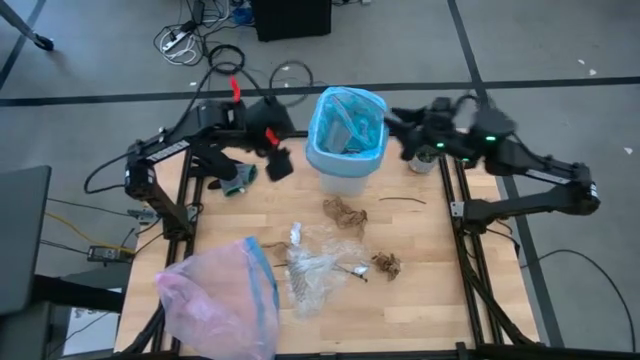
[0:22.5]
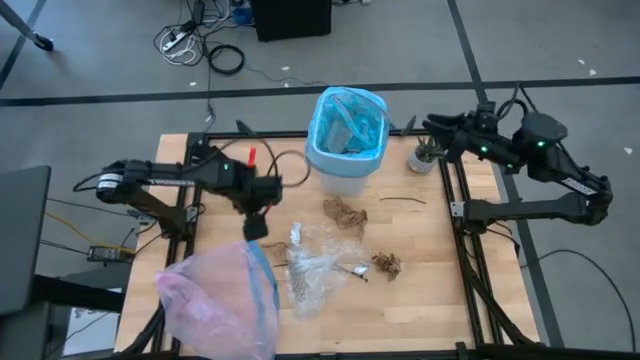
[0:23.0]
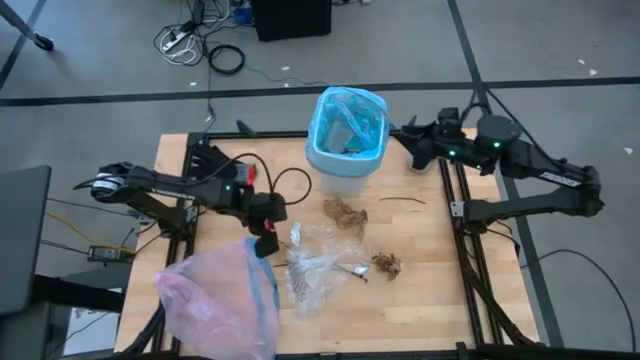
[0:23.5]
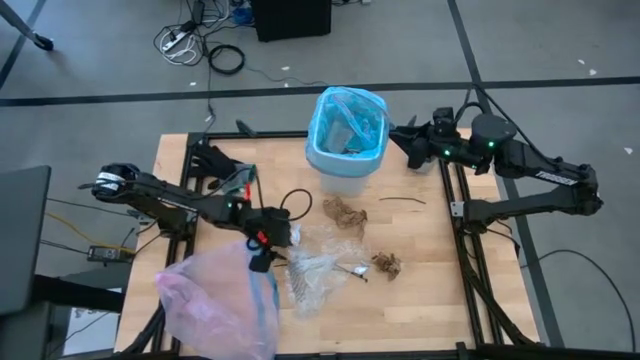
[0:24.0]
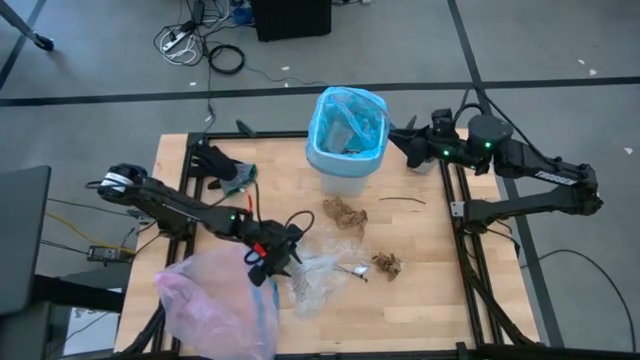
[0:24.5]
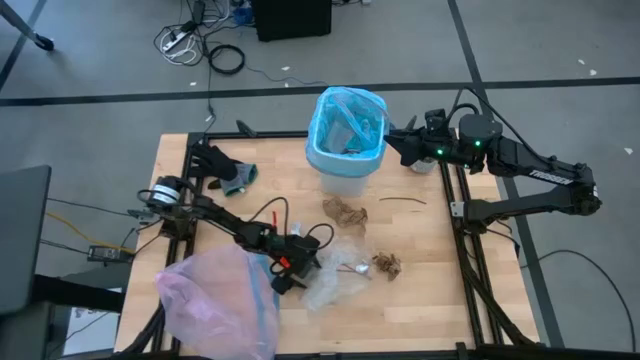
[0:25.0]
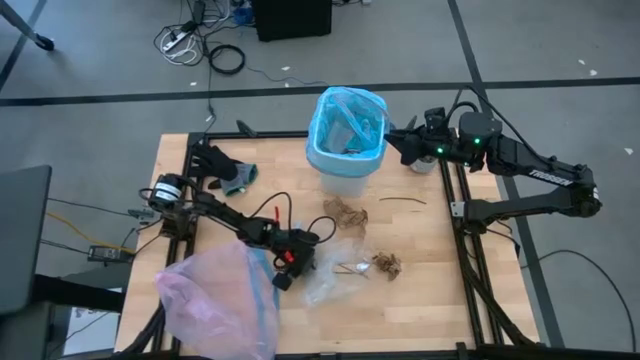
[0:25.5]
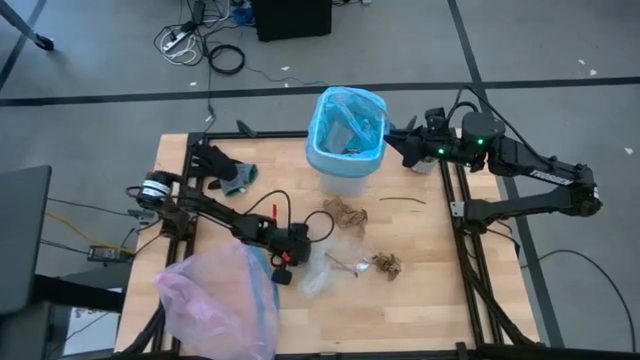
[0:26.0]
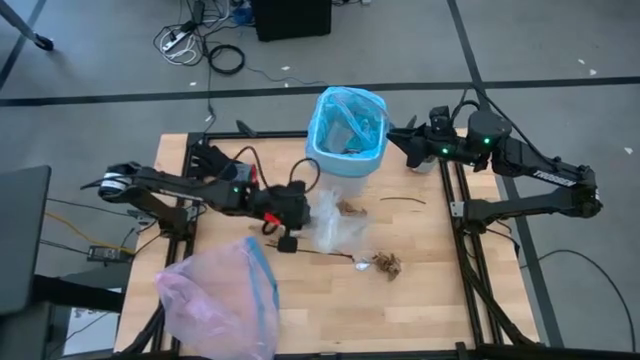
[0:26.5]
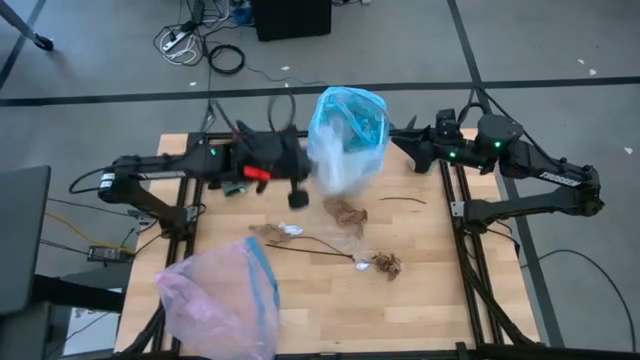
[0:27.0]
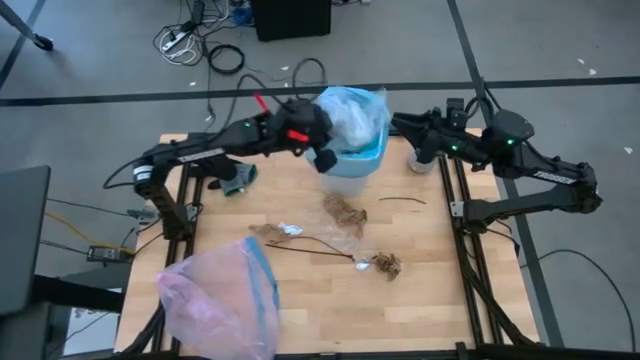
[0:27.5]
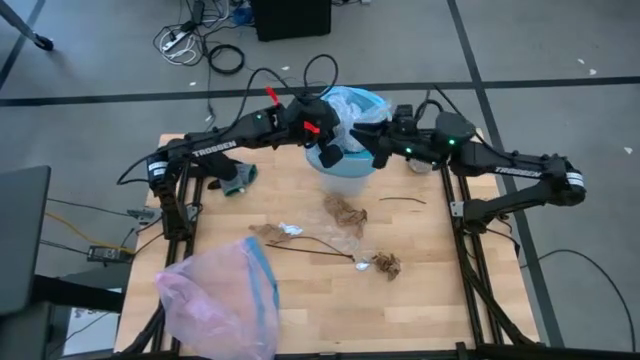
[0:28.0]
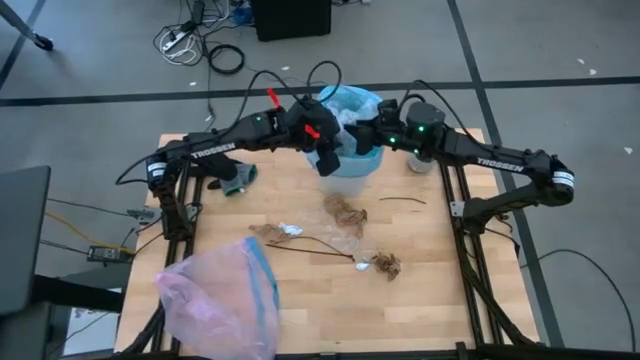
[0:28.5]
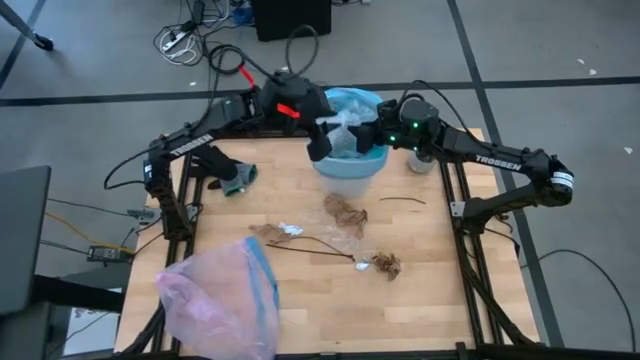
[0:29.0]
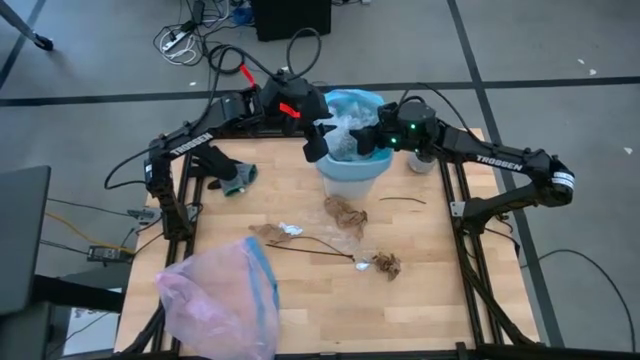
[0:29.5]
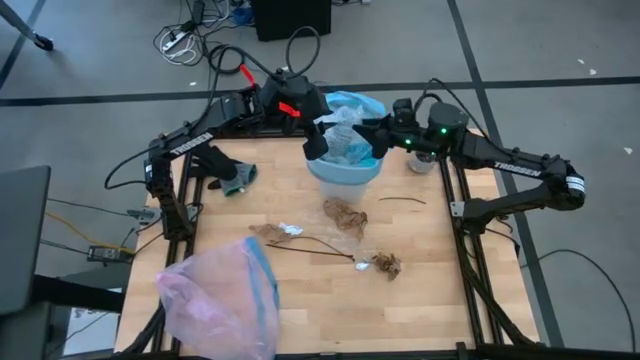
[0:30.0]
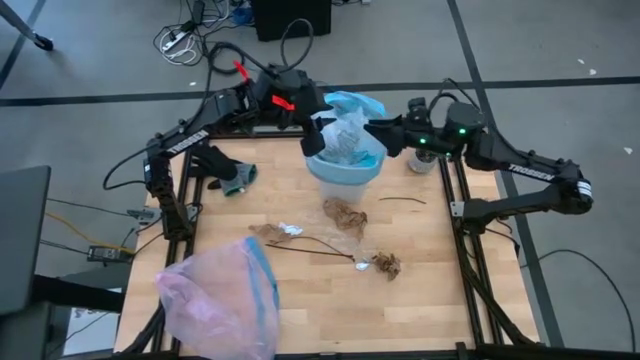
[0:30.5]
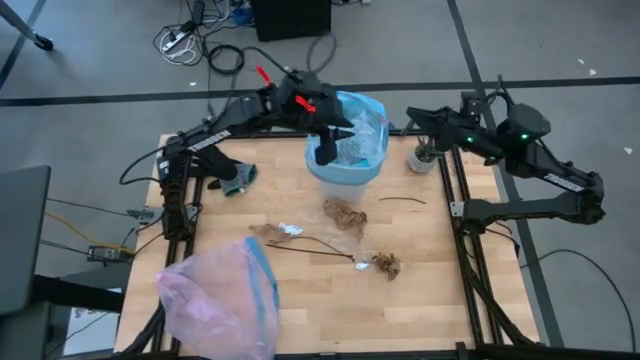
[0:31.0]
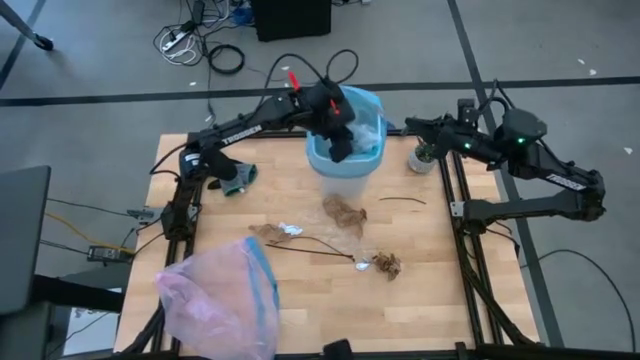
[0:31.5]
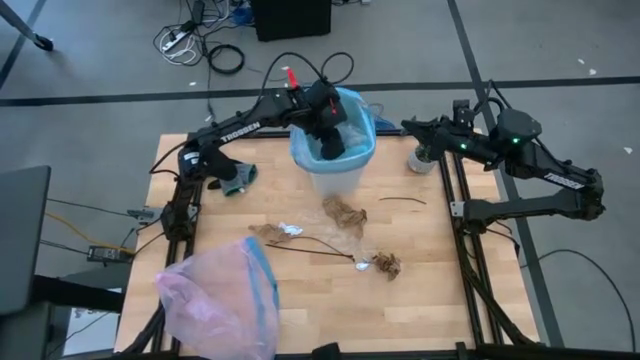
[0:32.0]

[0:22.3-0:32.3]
Task: place trash/remove bag and relplace
Put the transparent plastic trash from the table into the trash bin

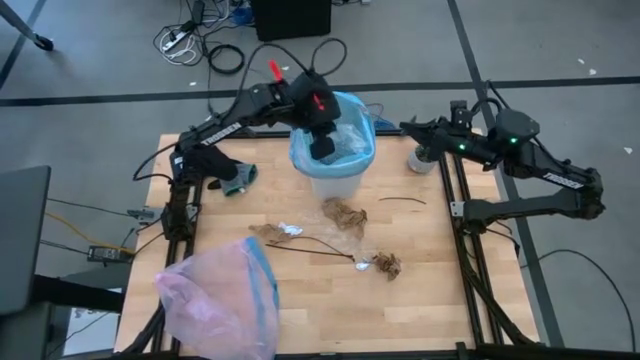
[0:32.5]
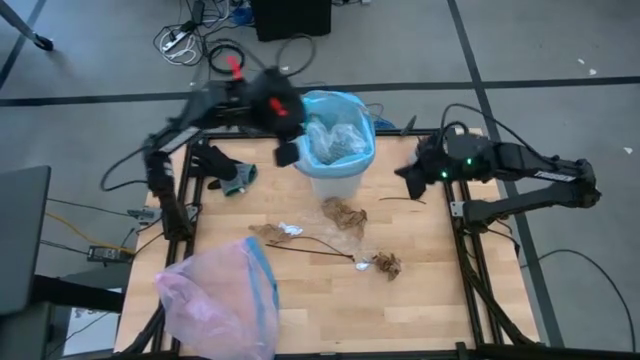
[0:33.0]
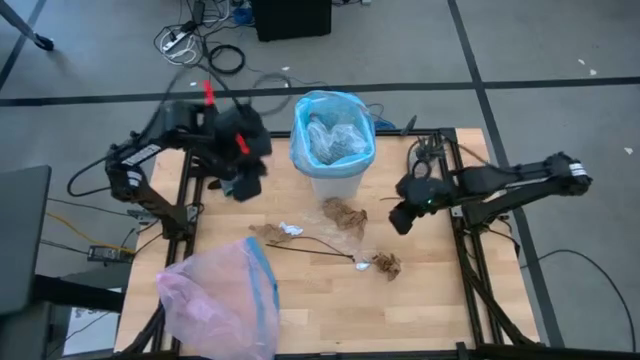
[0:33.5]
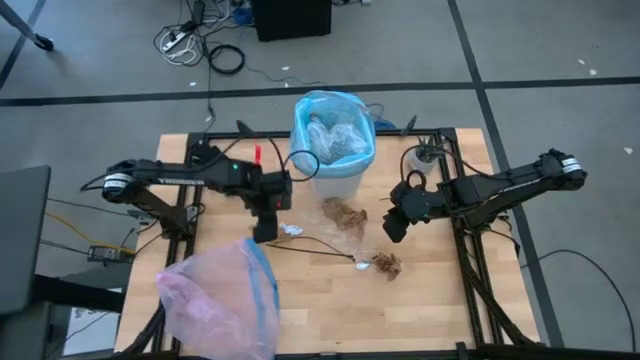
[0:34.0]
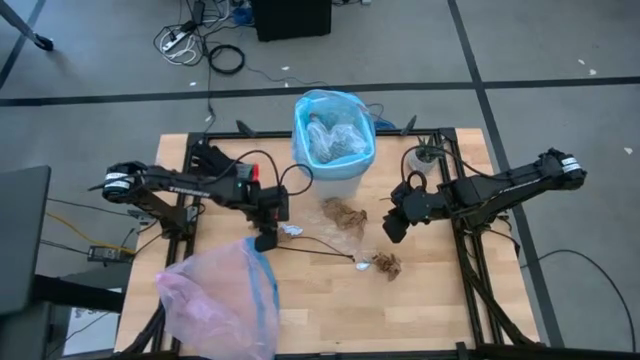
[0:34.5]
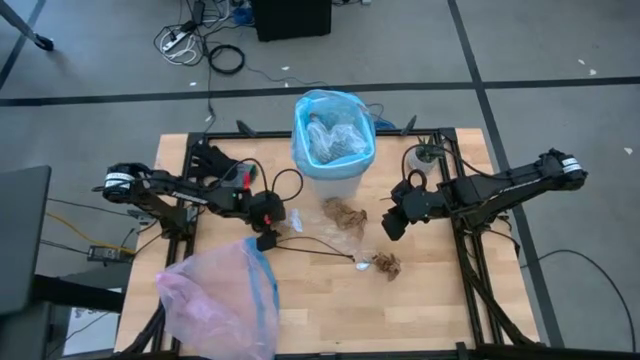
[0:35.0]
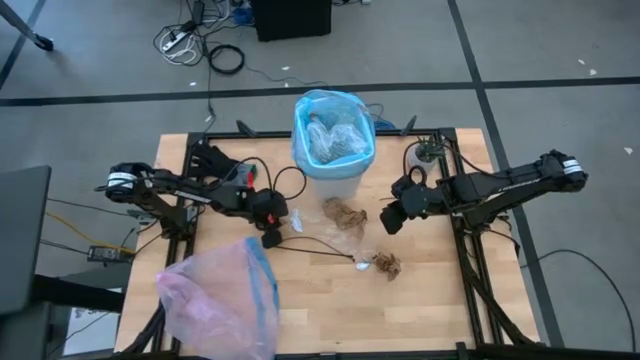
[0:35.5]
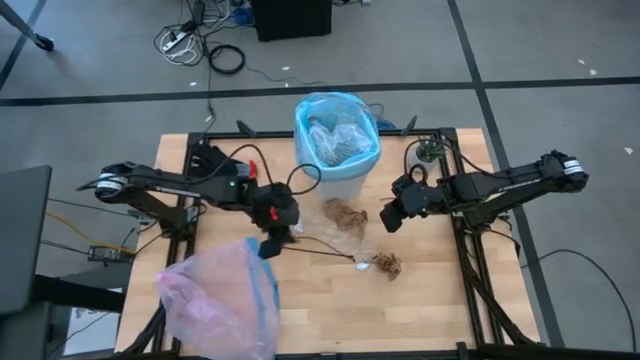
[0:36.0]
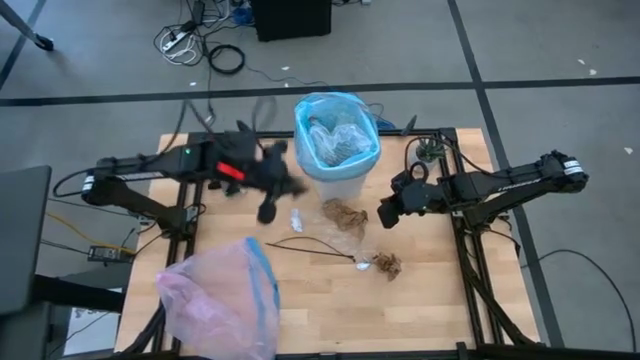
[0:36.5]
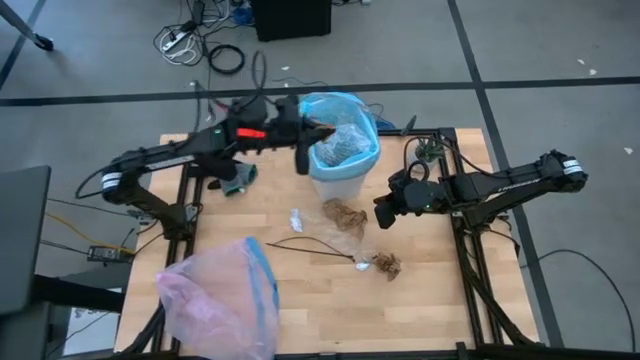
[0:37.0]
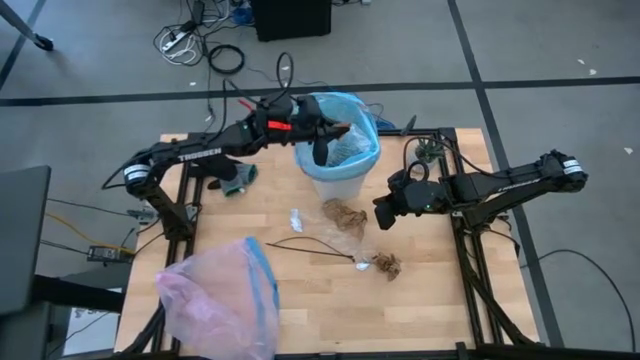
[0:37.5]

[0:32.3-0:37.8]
Put the brown paper into the trash bin

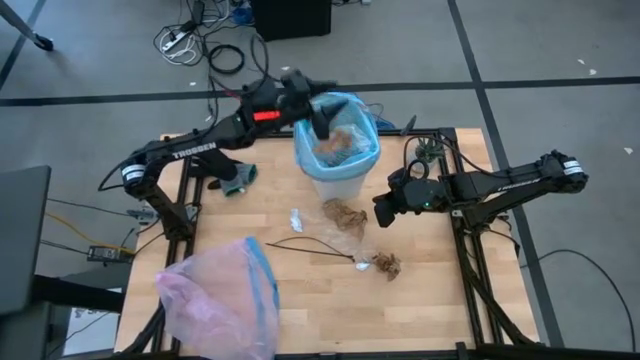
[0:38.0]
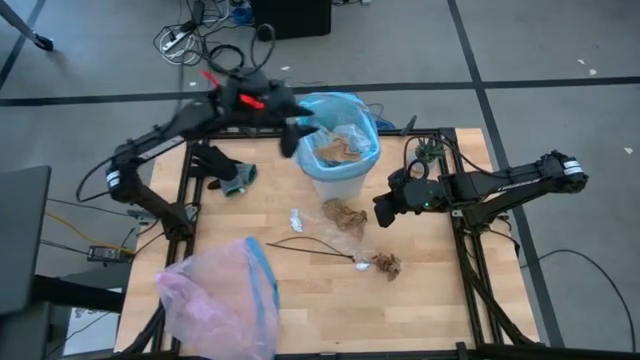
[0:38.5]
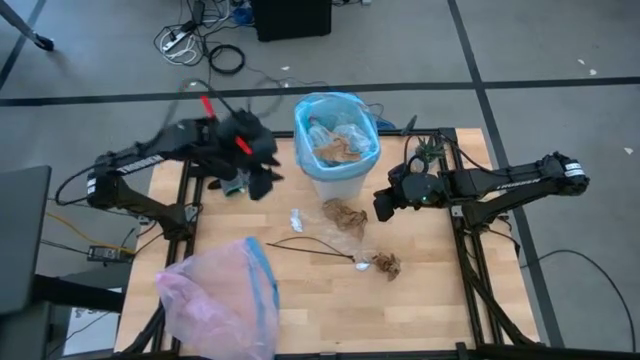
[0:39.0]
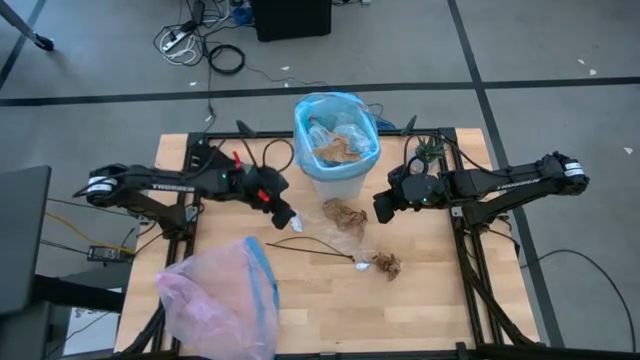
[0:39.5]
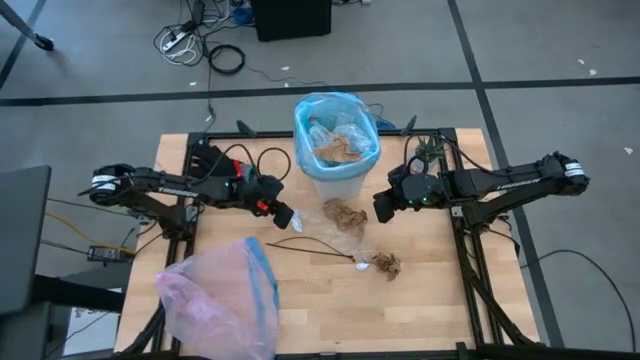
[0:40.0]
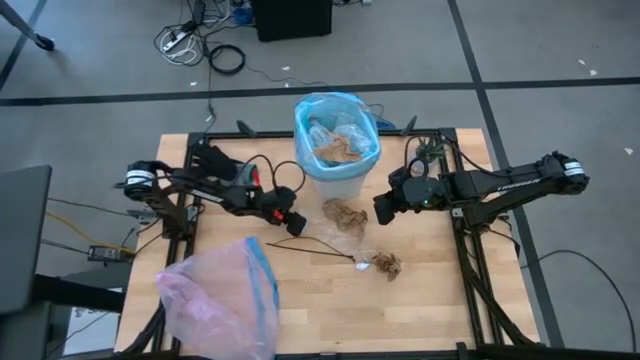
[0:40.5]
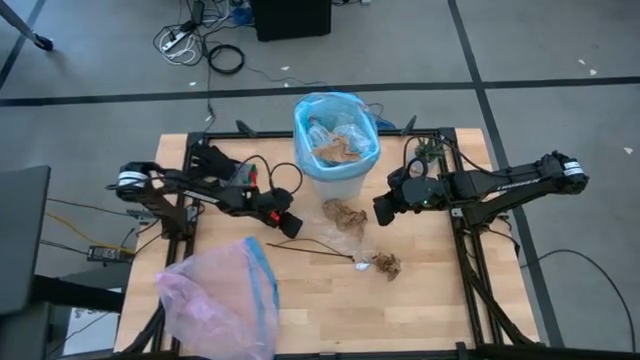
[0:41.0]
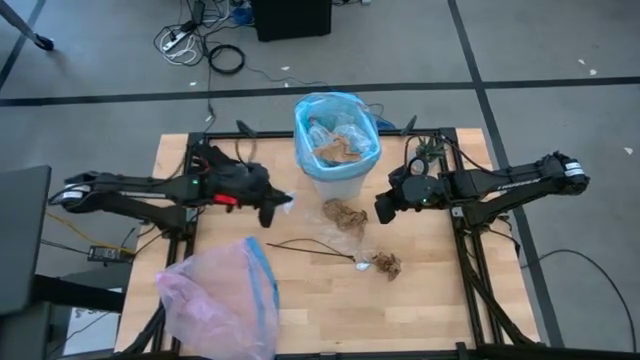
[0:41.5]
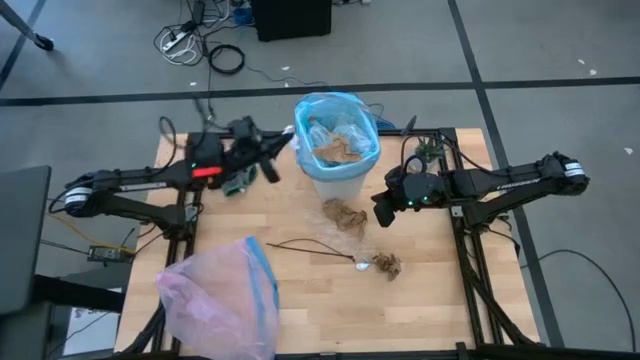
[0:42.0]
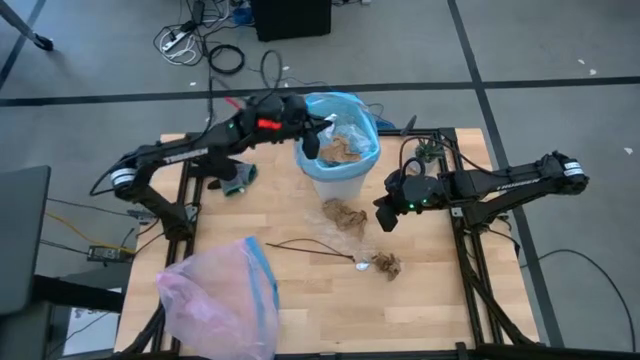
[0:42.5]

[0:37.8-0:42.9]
Put the white paper into the trash bin

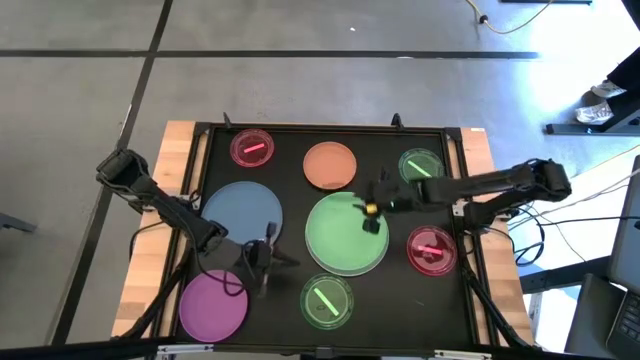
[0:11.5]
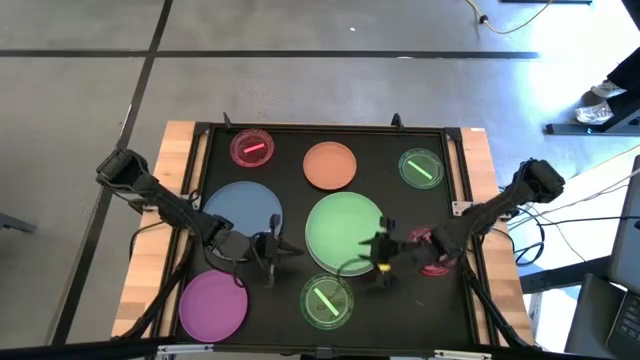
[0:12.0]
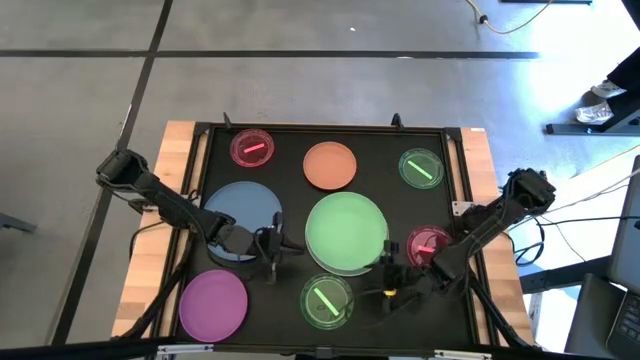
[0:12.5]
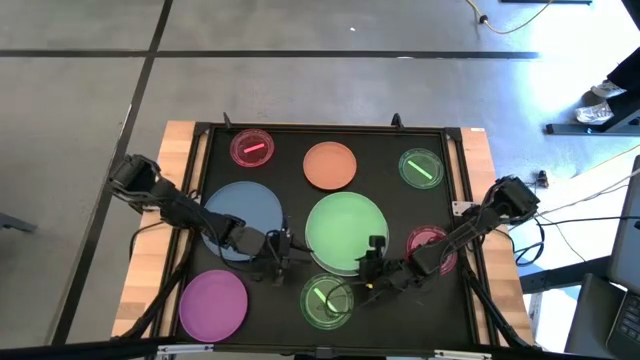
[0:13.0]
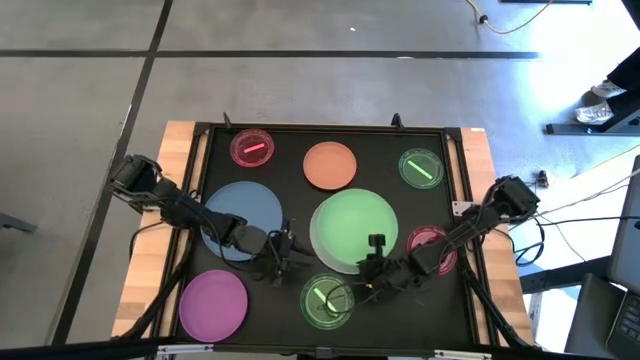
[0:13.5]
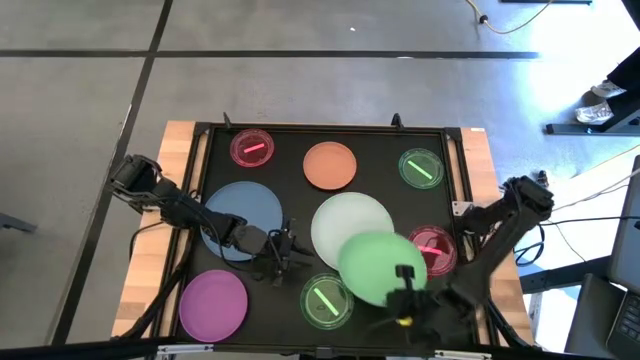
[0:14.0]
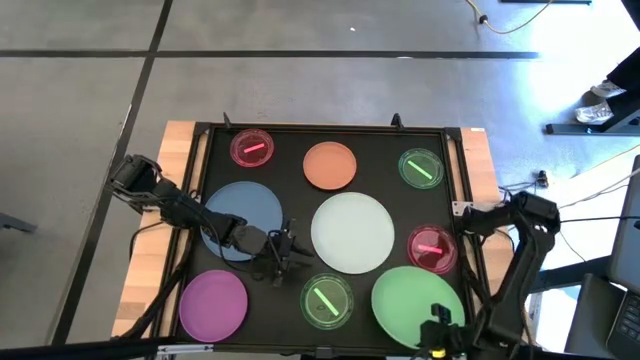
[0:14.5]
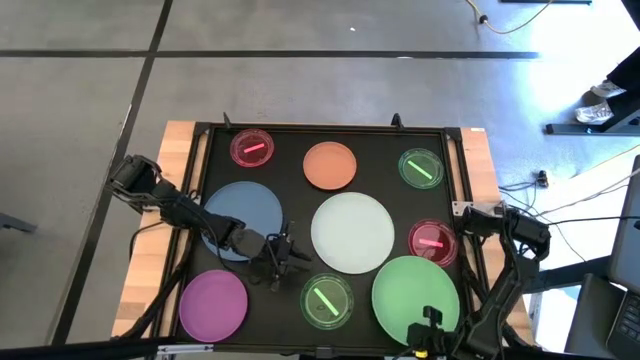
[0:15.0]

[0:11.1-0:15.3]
Task: Stack plastic plates
Remove the green plate from the white plate
